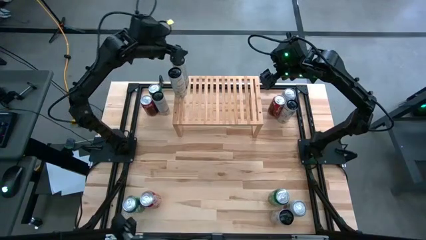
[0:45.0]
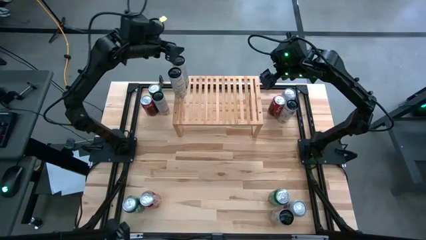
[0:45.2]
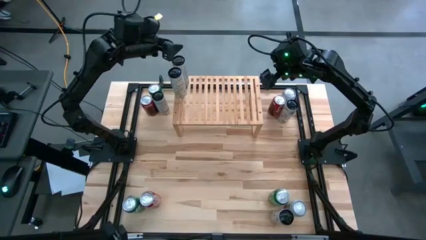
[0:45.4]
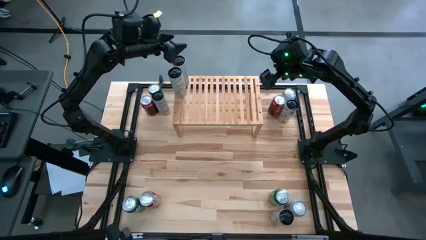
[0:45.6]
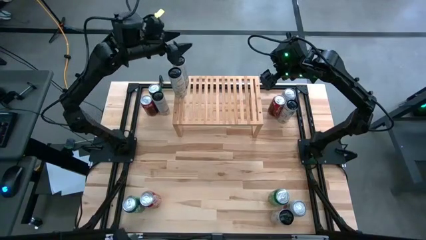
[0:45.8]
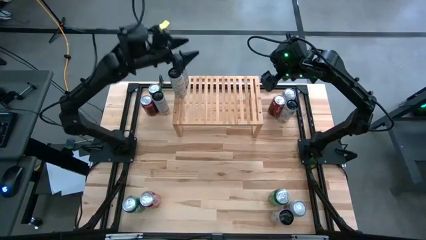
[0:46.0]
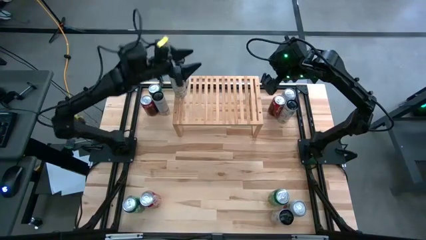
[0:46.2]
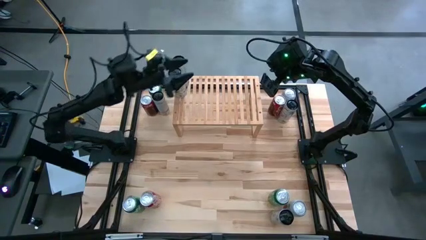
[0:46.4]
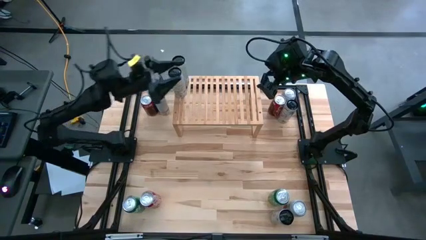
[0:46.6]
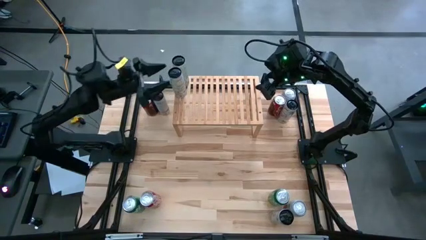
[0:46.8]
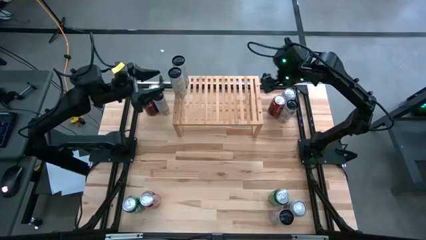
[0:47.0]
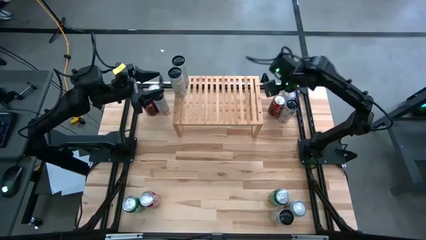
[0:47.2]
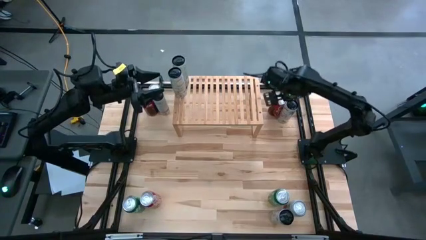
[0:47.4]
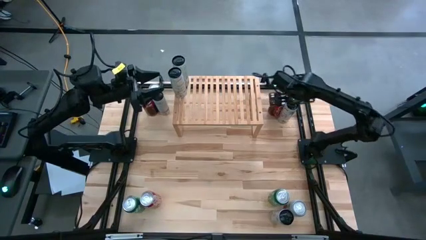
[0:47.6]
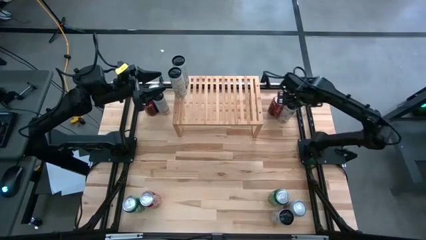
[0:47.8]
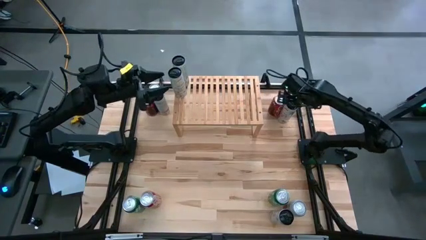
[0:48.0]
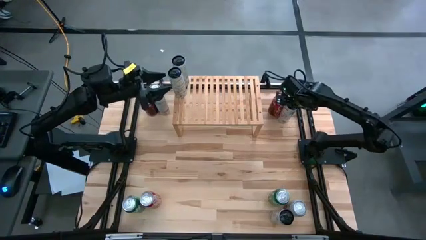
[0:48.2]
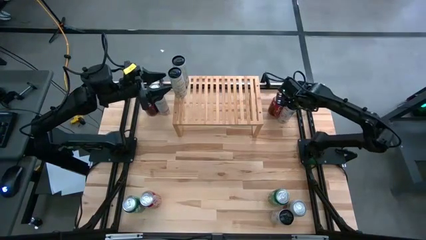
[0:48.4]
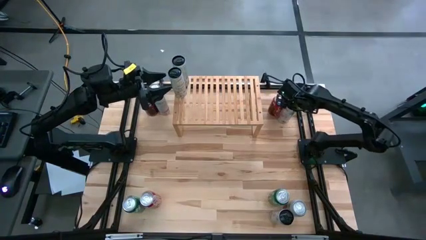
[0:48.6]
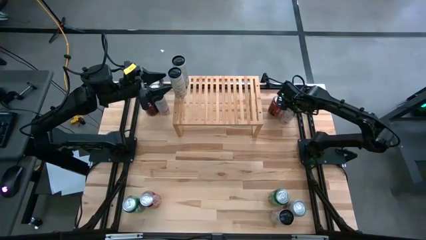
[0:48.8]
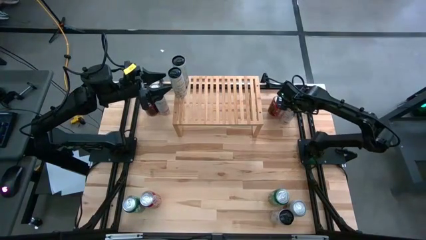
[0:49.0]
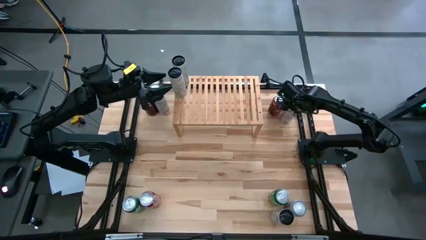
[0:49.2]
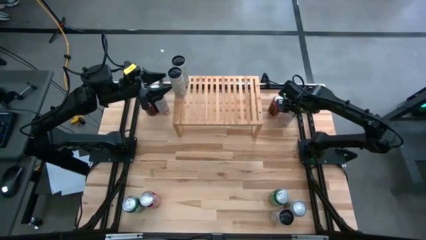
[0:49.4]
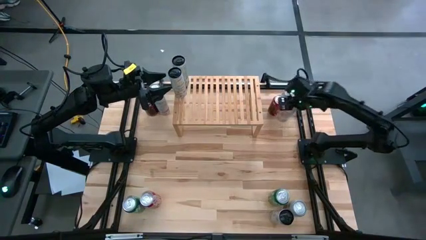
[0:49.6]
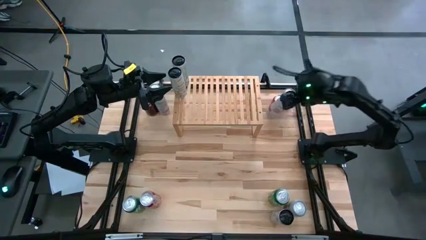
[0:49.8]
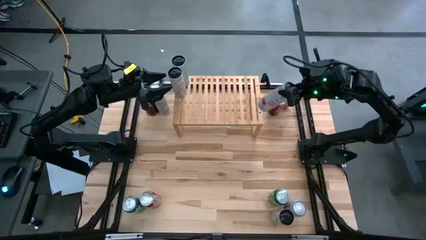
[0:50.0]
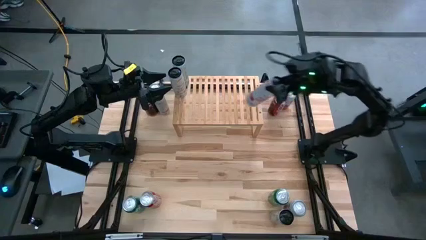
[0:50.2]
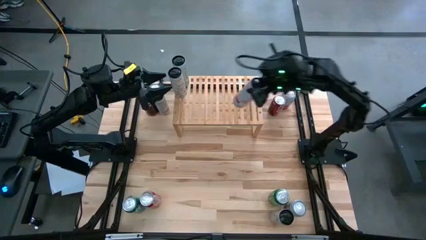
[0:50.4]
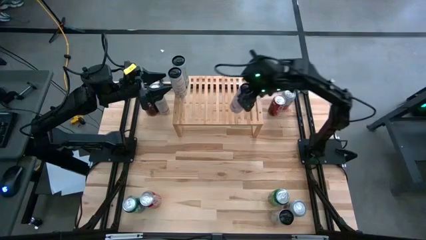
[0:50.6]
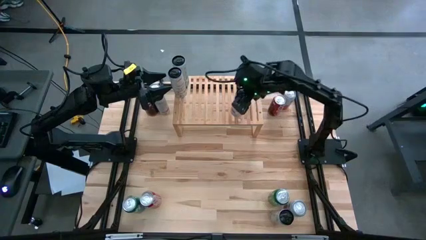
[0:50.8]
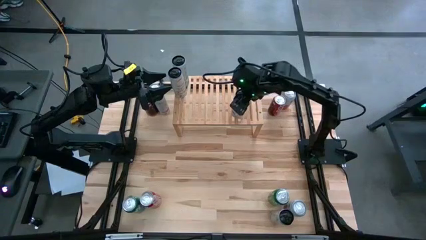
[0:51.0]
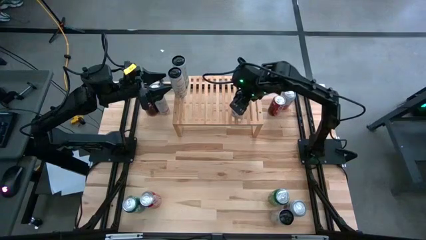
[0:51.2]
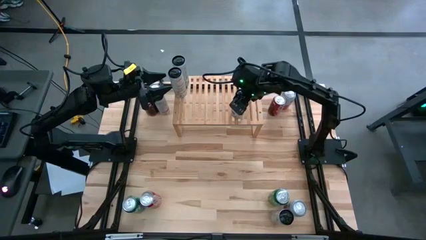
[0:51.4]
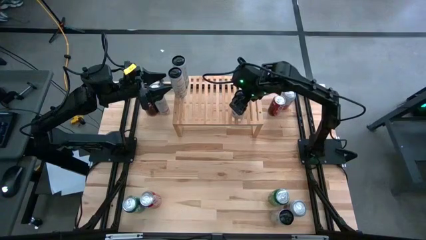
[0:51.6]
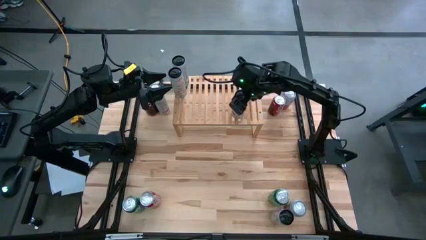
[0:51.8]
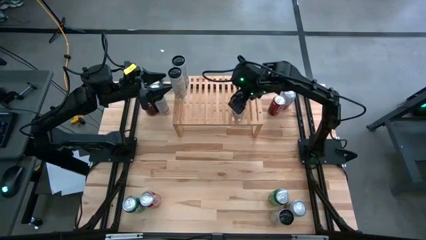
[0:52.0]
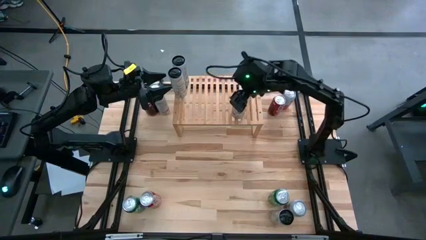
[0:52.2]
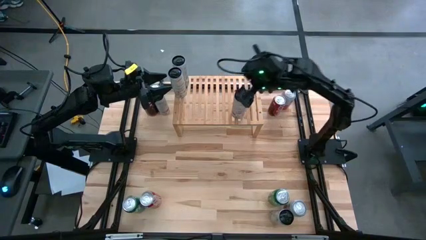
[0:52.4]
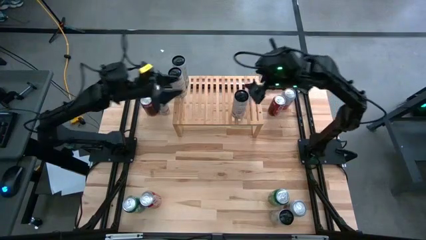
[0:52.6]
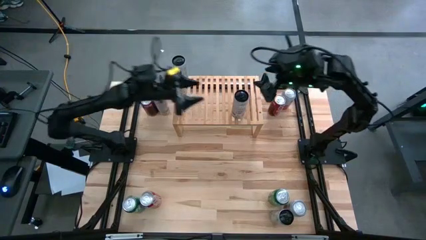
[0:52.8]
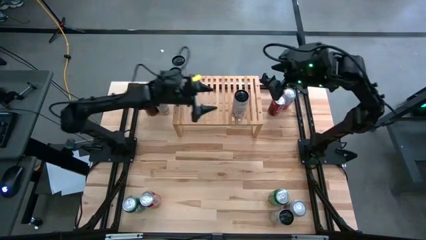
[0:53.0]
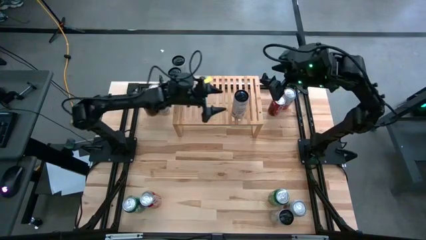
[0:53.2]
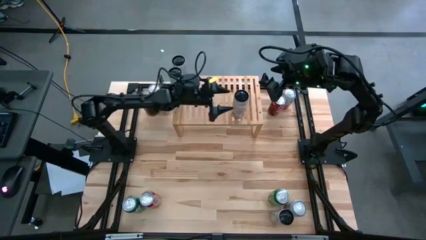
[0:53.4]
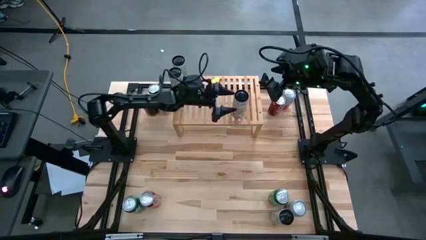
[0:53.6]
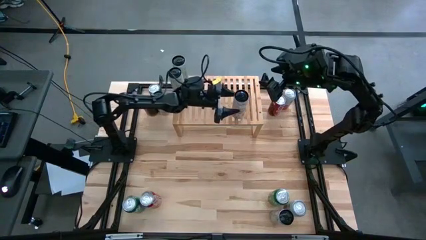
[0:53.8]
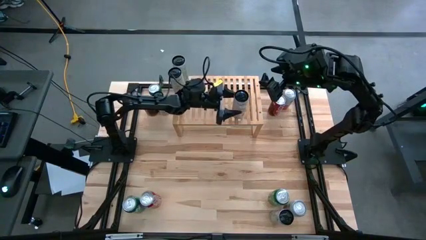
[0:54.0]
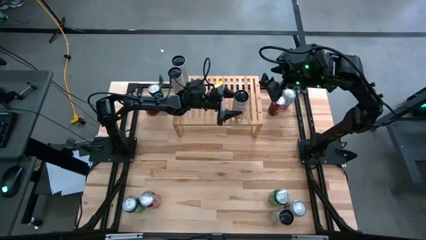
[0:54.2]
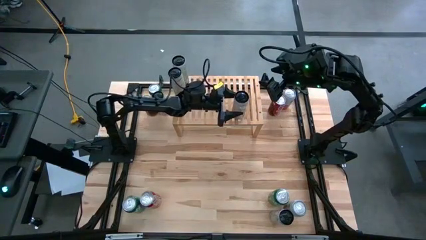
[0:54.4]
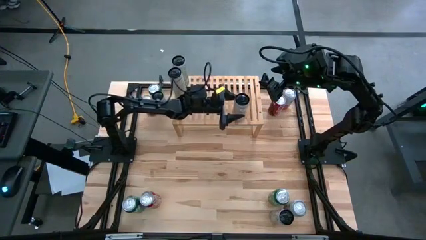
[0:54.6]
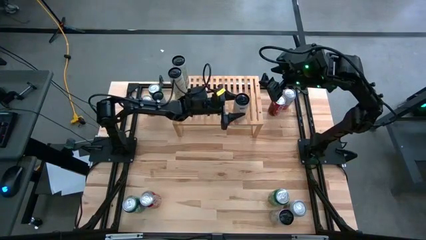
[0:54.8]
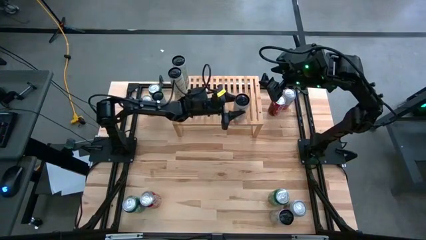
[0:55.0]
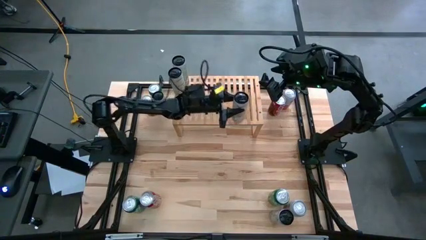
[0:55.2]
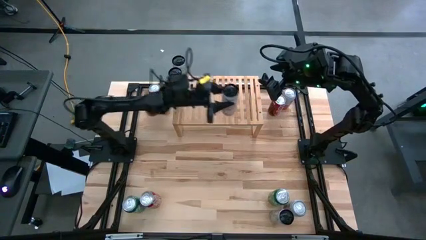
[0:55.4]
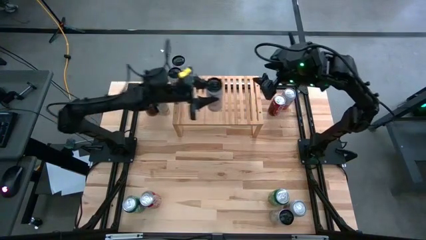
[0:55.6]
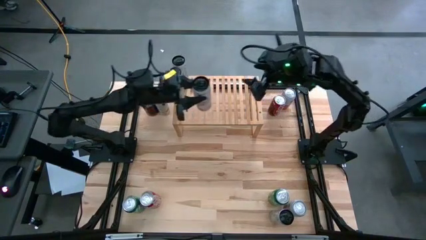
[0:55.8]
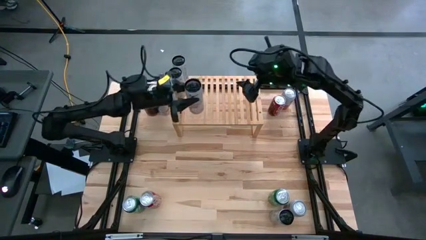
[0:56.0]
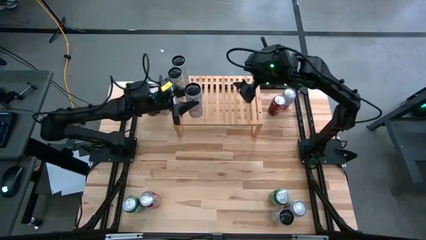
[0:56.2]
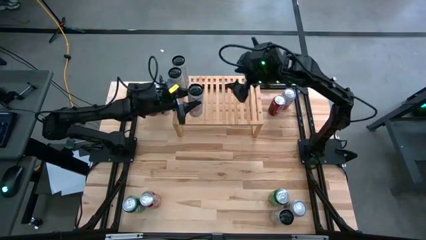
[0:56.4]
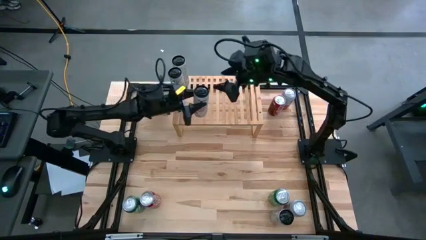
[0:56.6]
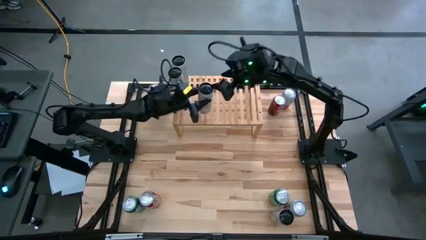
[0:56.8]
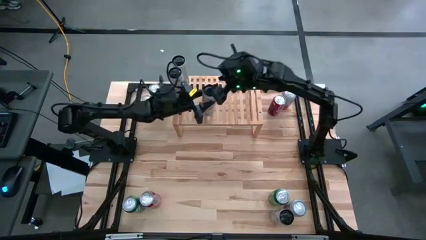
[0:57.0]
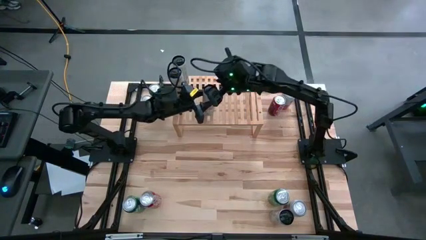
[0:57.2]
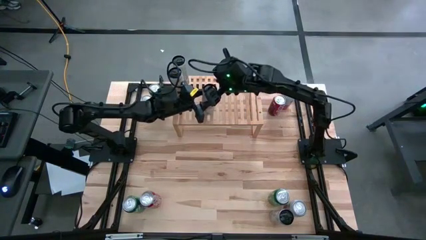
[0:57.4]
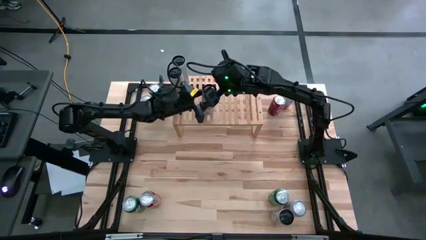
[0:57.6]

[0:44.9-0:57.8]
Task: Place canned beverage on shelf
Put the top right white pink soda can on the shelf
